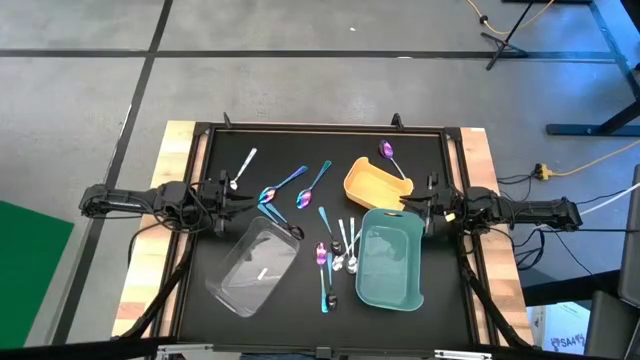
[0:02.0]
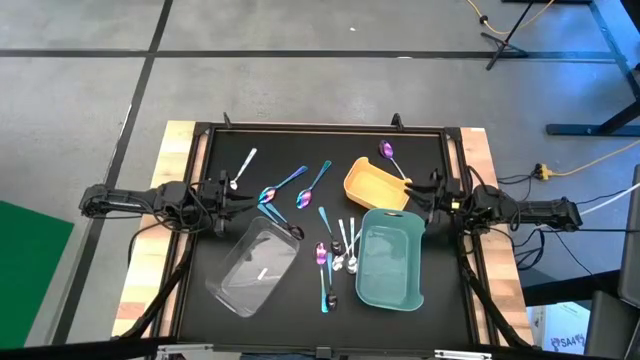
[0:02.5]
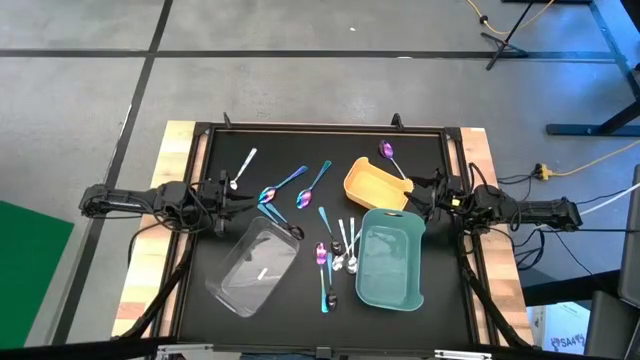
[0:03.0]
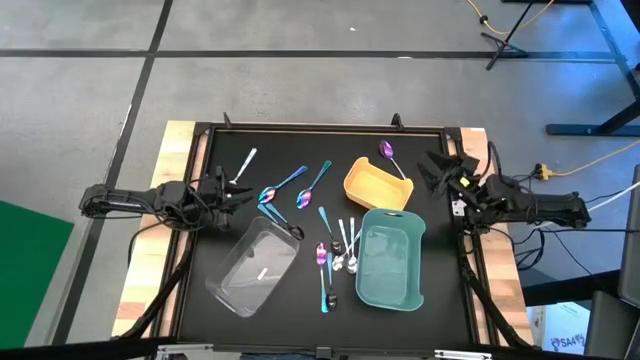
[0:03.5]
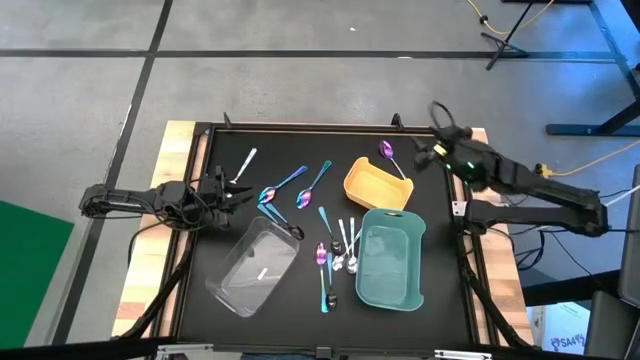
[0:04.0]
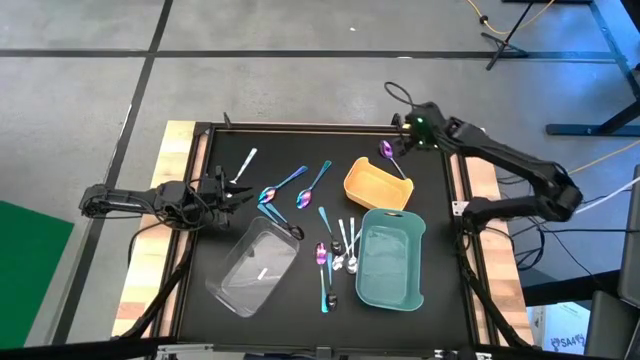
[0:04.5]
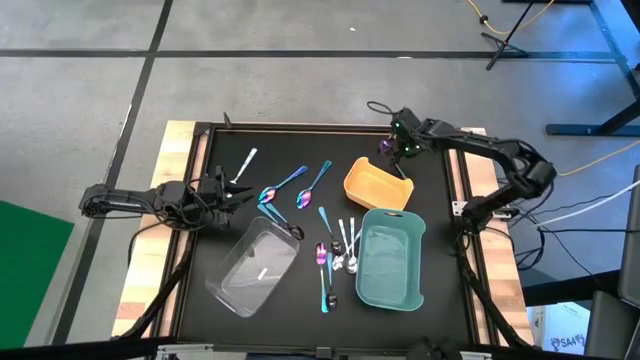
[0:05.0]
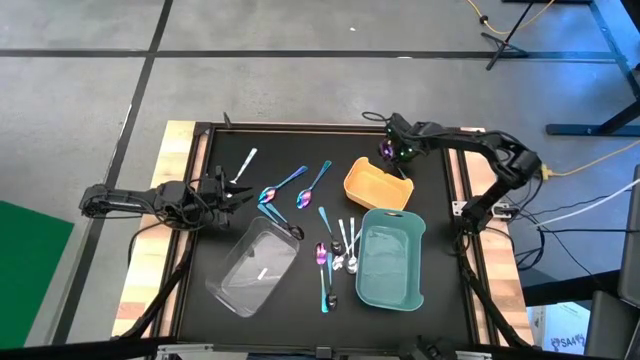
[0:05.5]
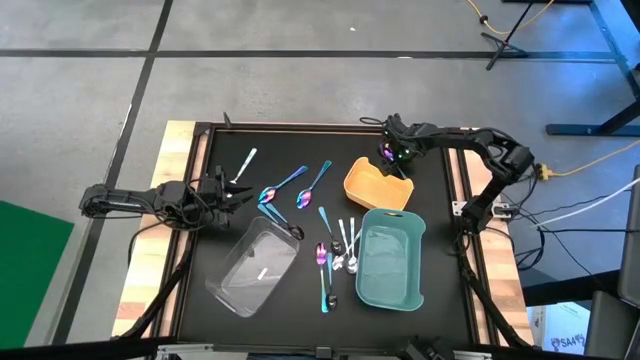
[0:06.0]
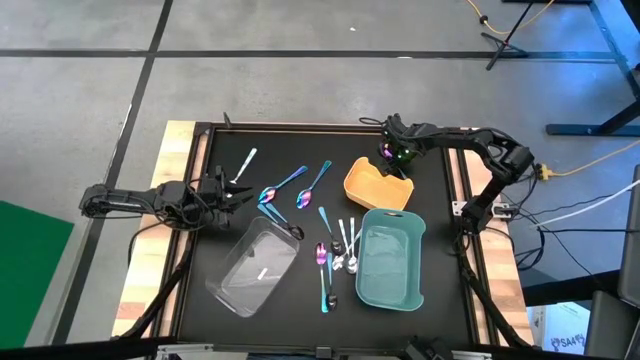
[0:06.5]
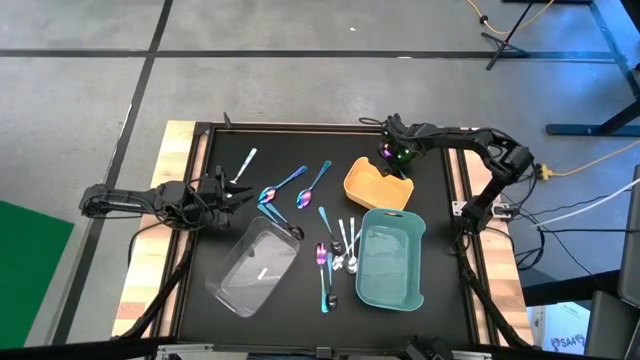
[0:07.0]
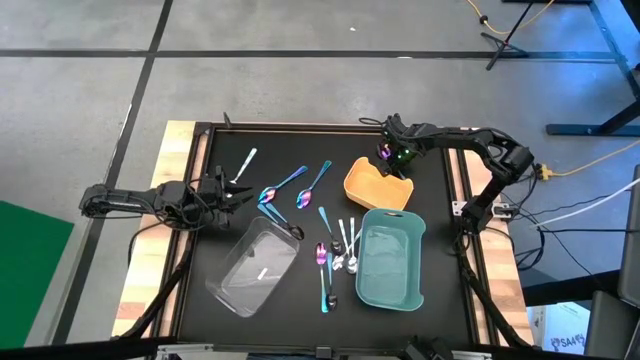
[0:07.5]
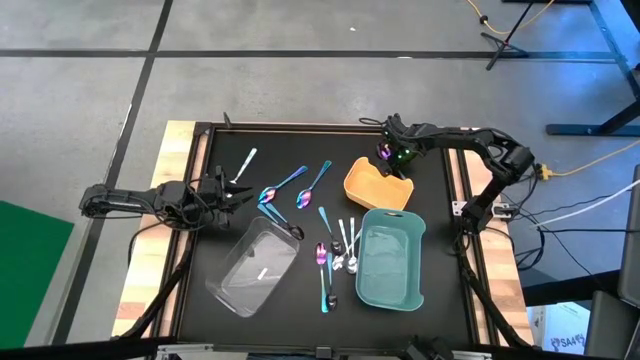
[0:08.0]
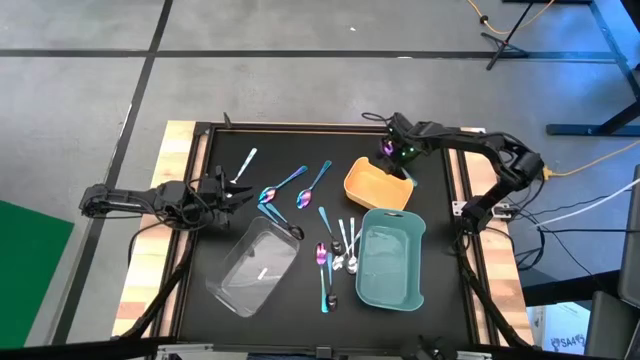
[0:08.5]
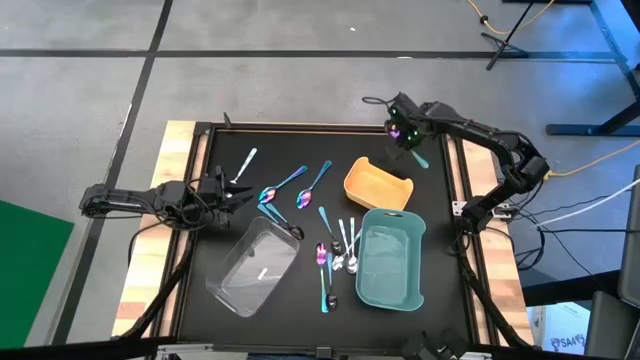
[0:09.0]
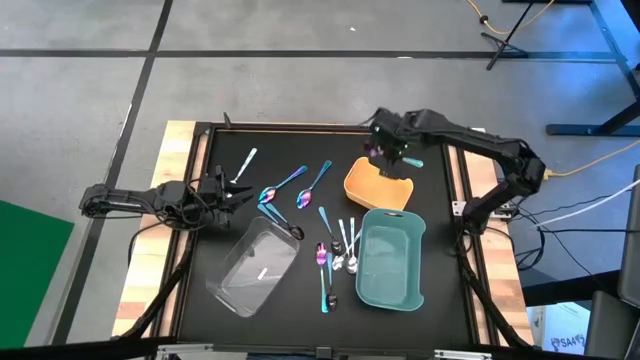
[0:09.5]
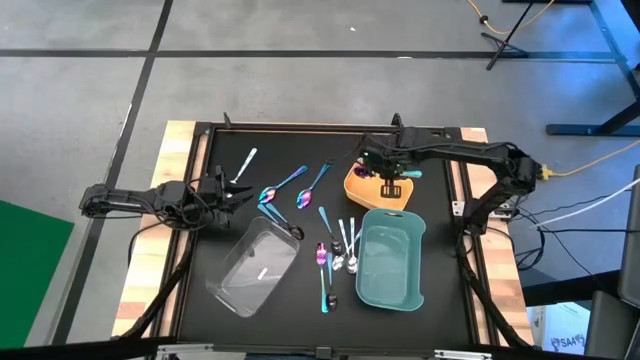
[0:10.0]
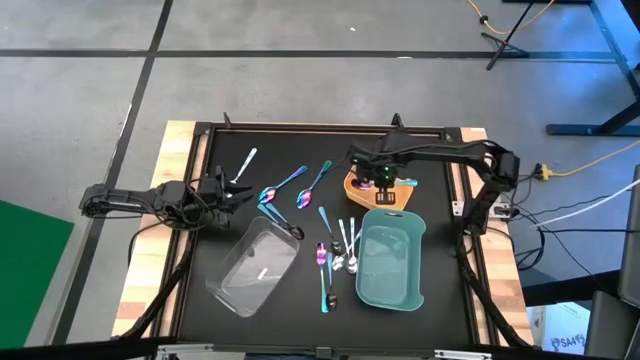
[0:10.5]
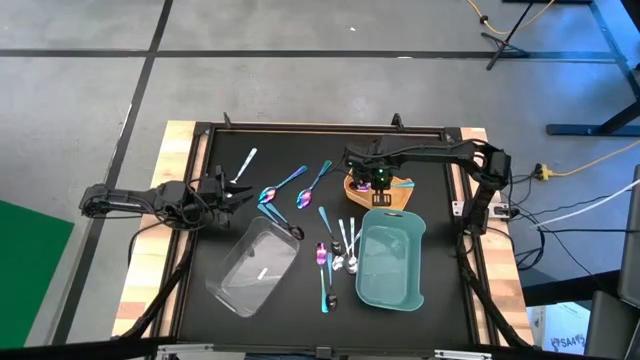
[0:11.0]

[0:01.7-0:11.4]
Task: Sort silverware by color (type)
Put the violet spoon into the yellow bin

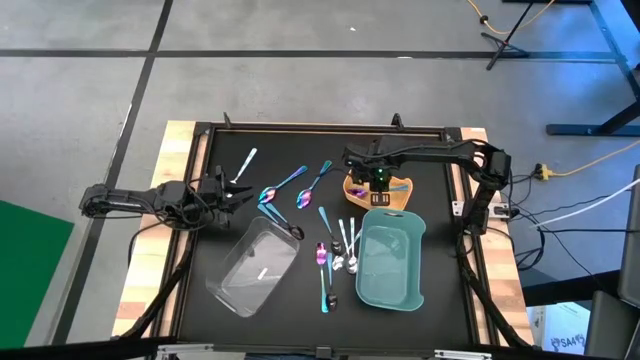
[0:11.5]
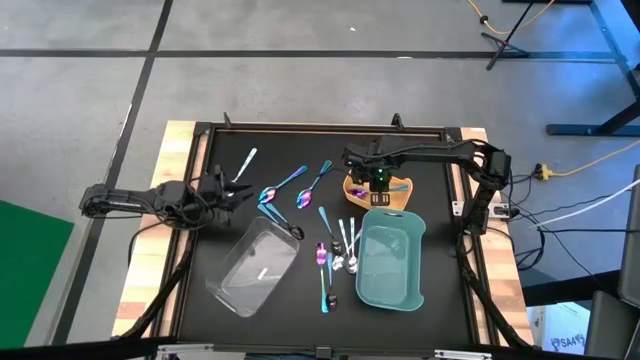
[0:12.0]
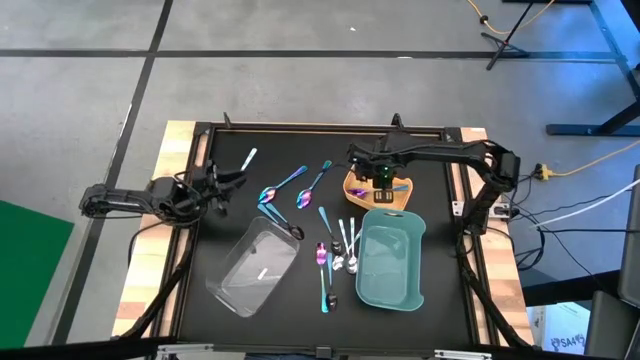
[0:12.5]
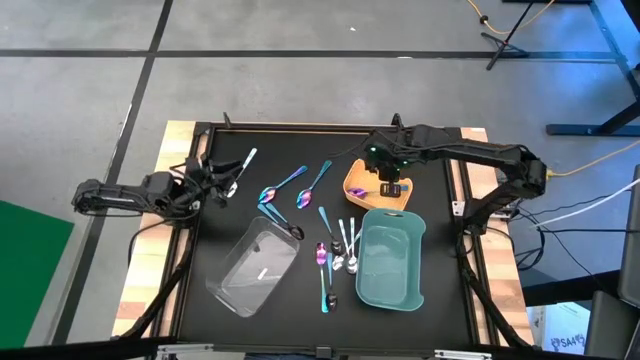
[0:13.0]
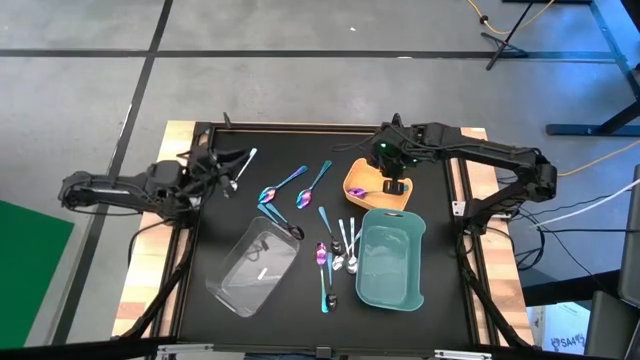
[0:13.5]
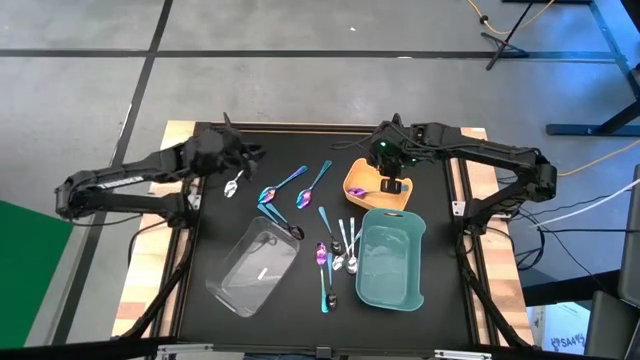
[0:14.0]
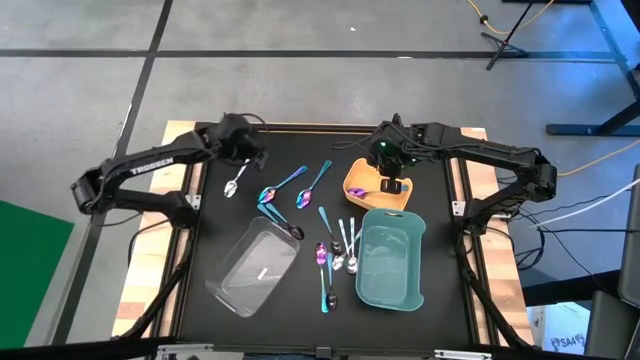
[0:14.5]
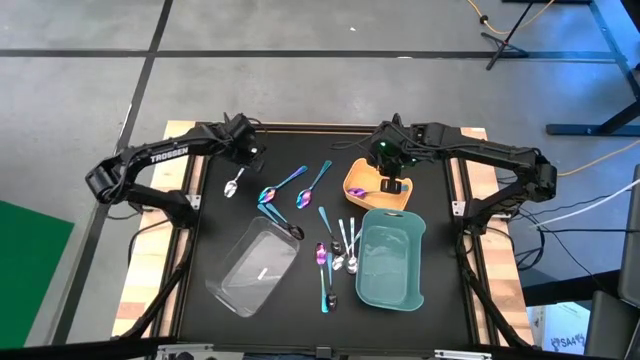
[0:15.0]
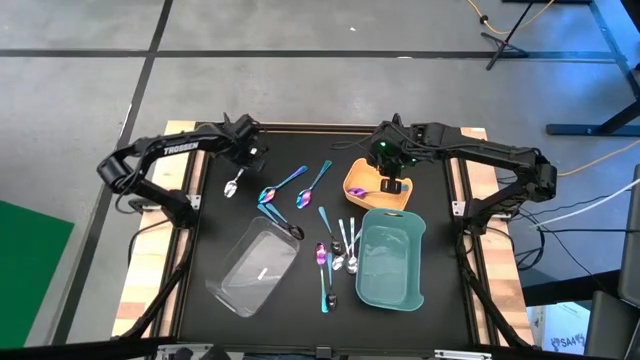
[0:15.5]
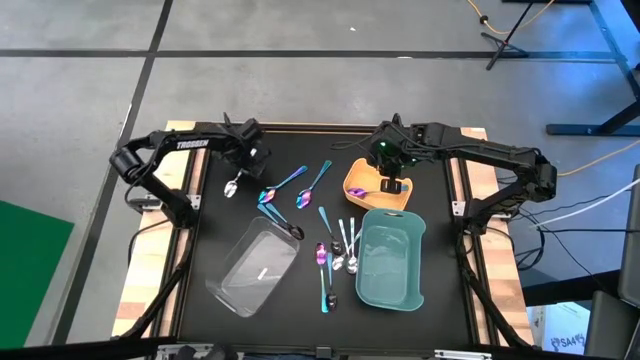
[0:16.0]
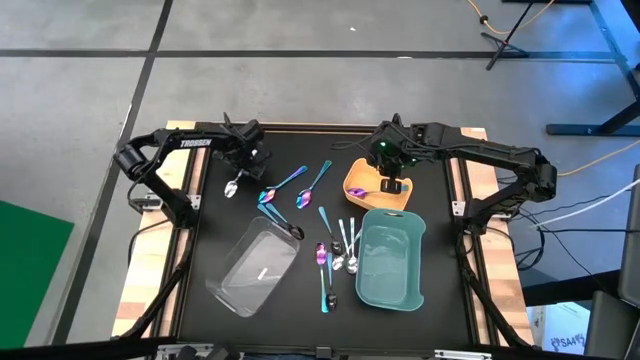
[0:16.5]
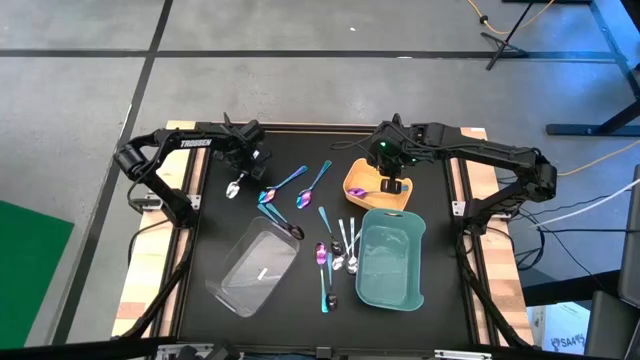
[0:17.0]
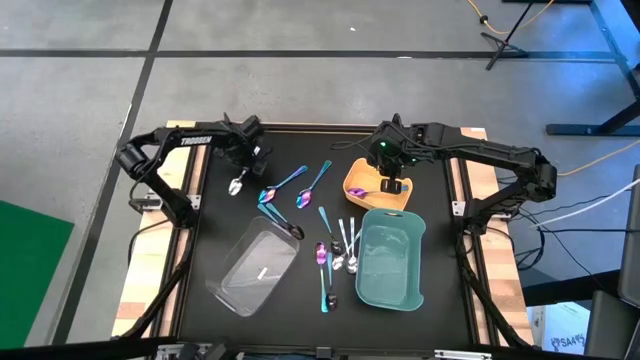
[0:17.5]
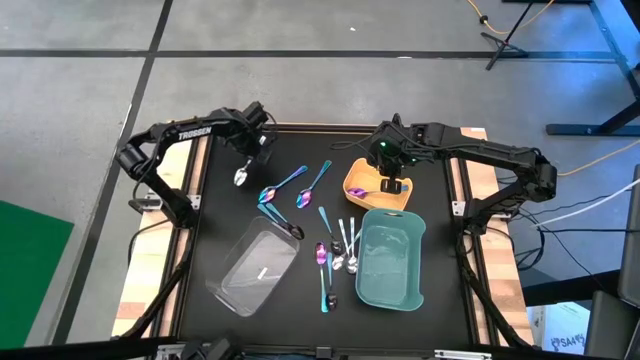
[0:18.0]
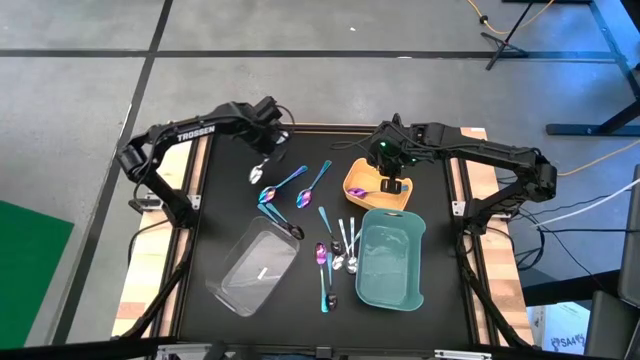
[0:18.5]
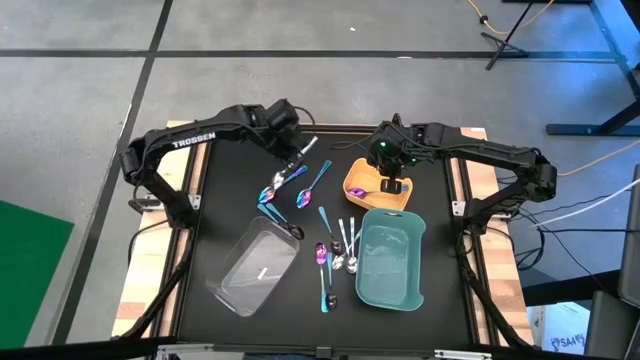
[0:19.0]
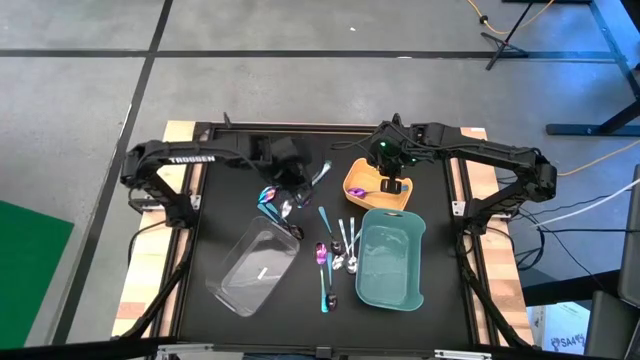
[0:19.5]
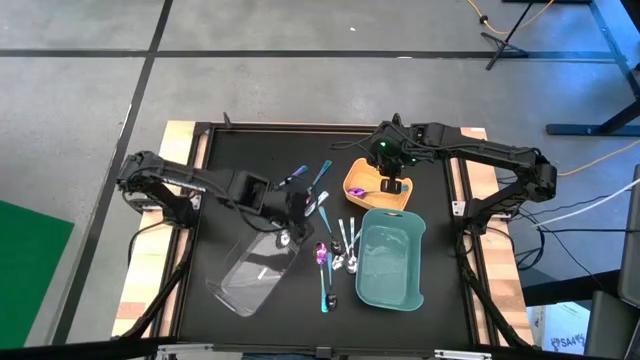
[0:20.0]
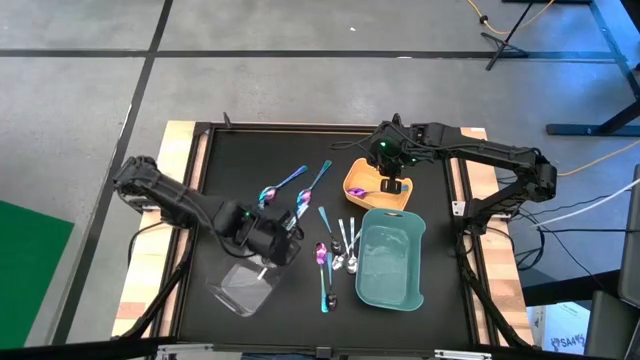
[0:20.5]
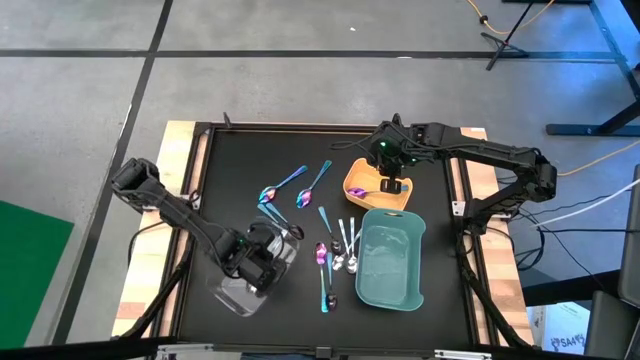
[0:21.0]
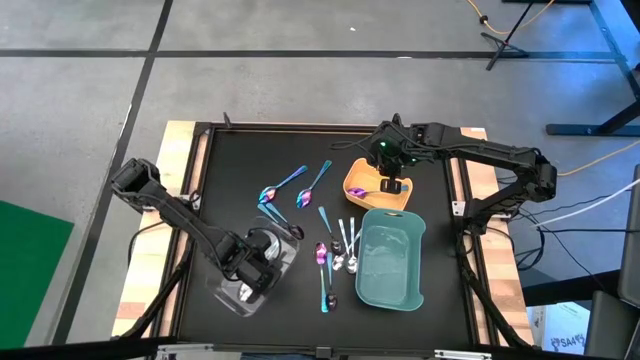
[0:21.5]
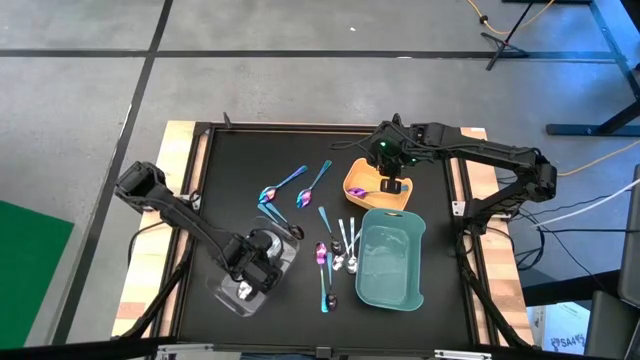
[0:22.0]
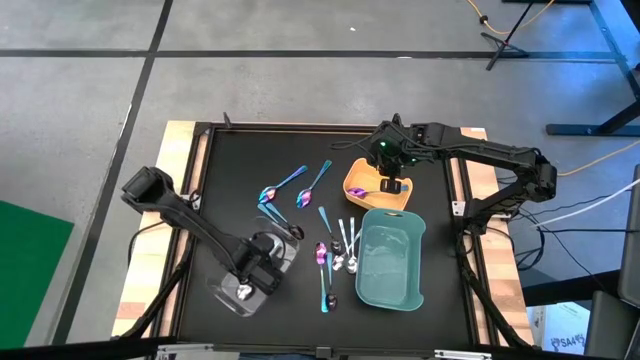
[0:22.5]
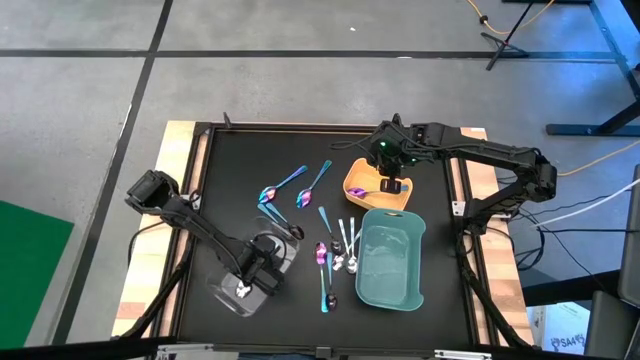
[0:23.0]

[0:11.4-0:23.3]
Put the white patterned spoon into the transparent bin
